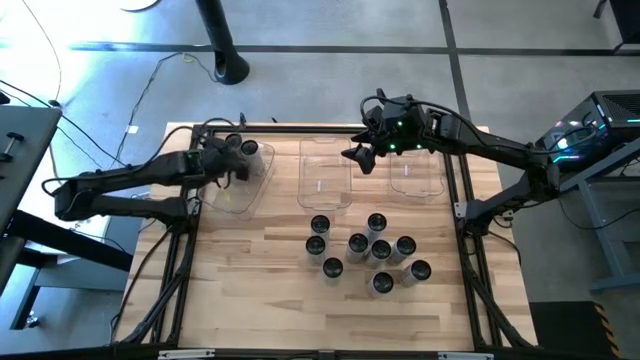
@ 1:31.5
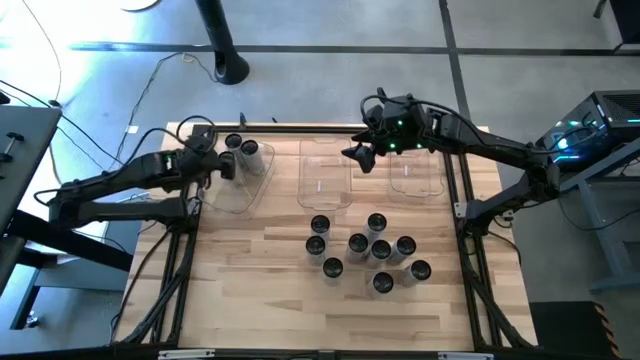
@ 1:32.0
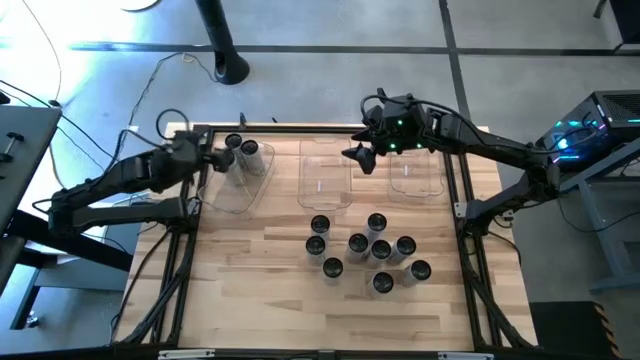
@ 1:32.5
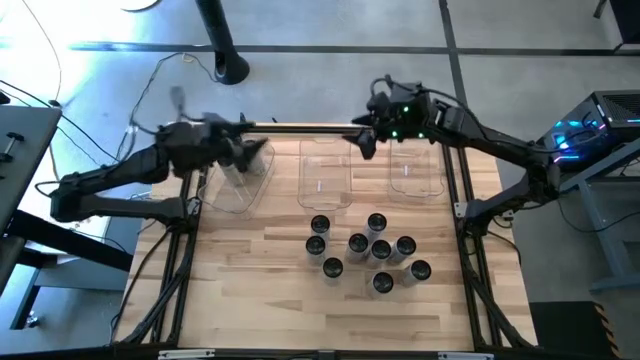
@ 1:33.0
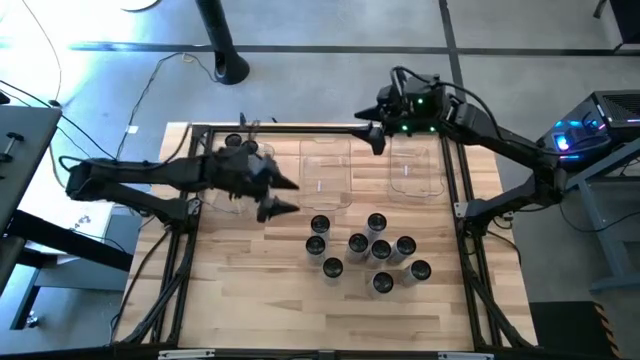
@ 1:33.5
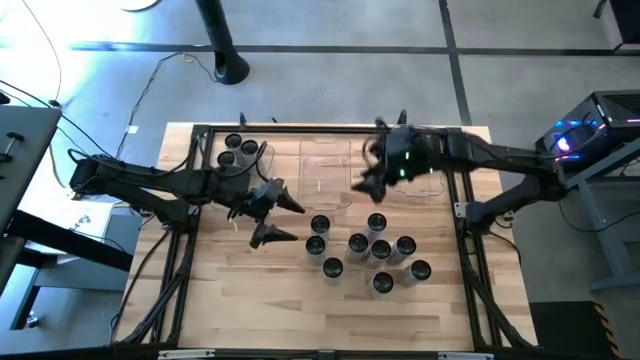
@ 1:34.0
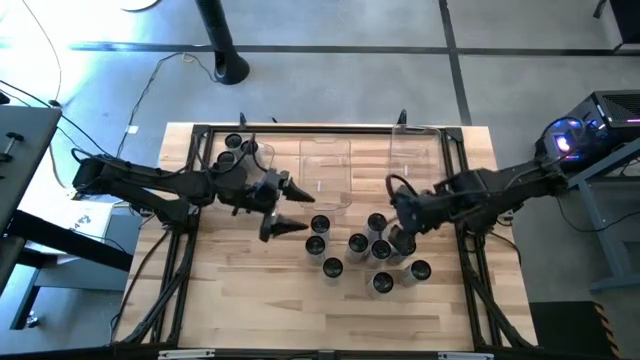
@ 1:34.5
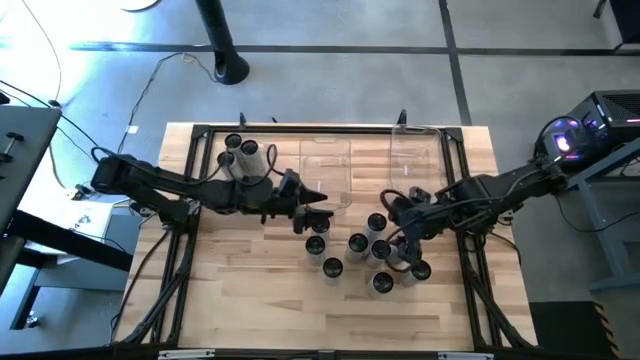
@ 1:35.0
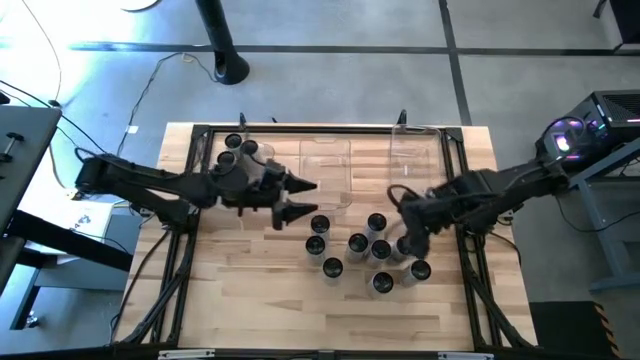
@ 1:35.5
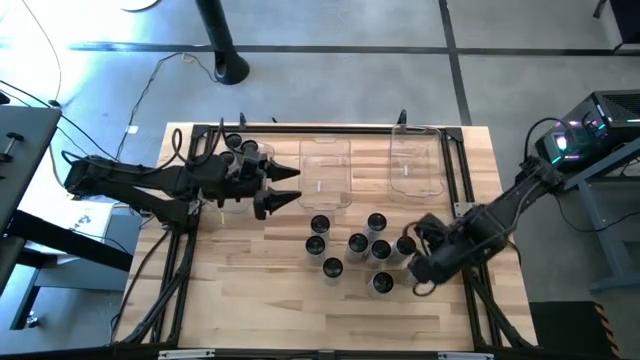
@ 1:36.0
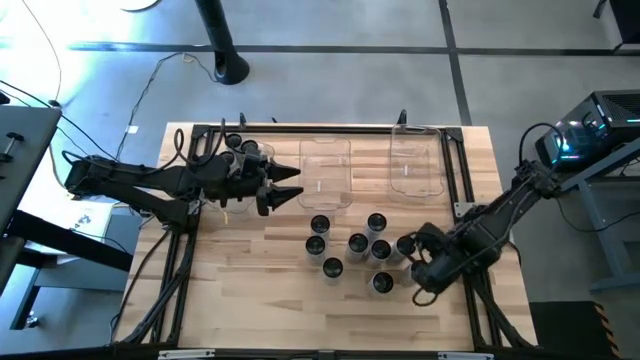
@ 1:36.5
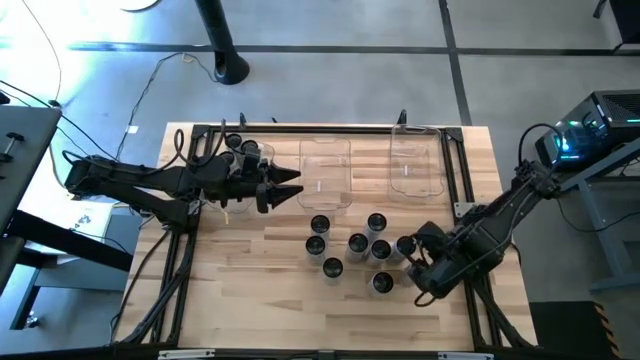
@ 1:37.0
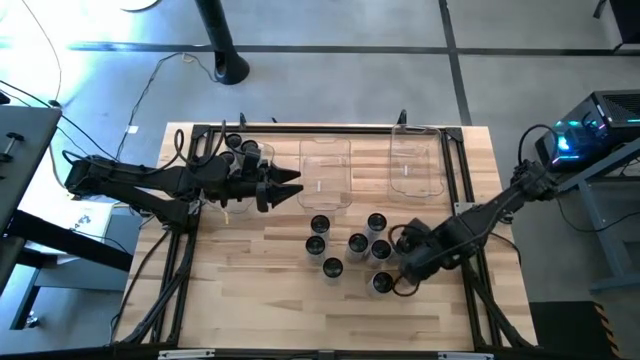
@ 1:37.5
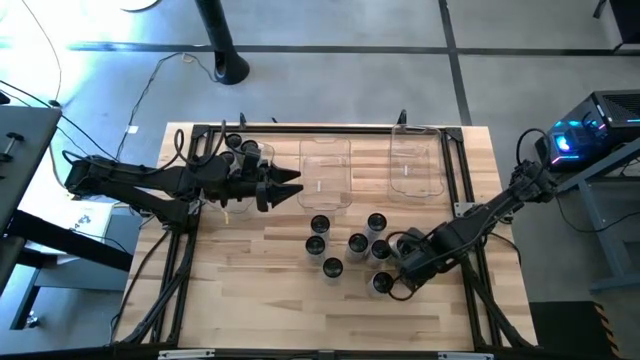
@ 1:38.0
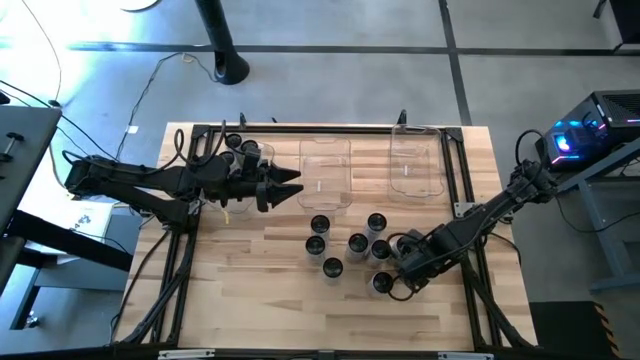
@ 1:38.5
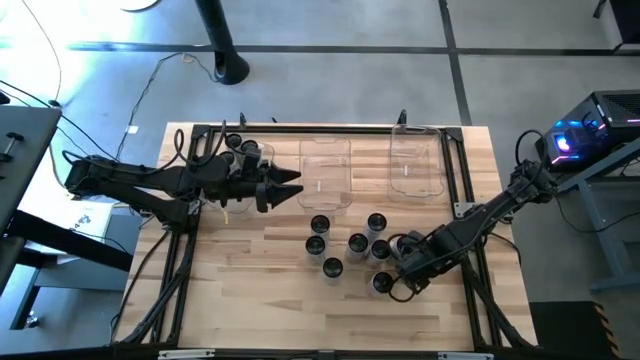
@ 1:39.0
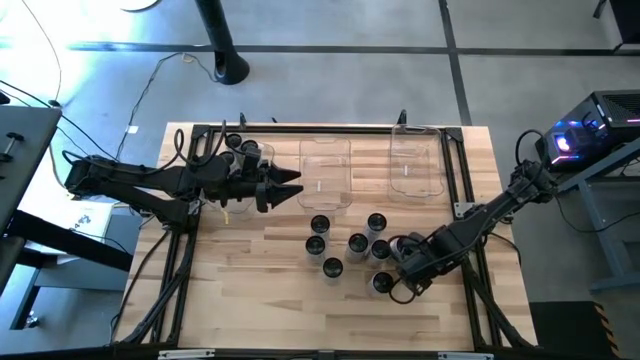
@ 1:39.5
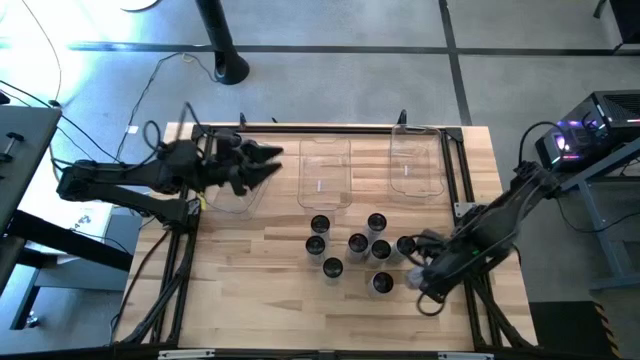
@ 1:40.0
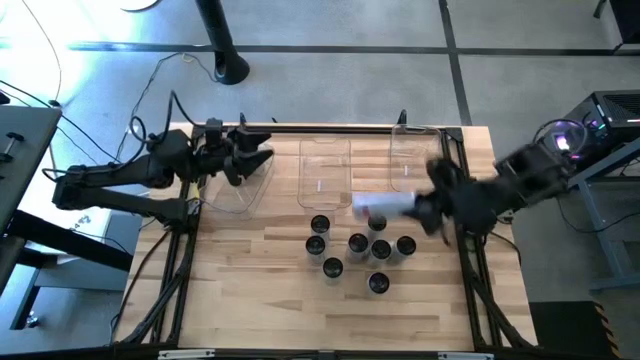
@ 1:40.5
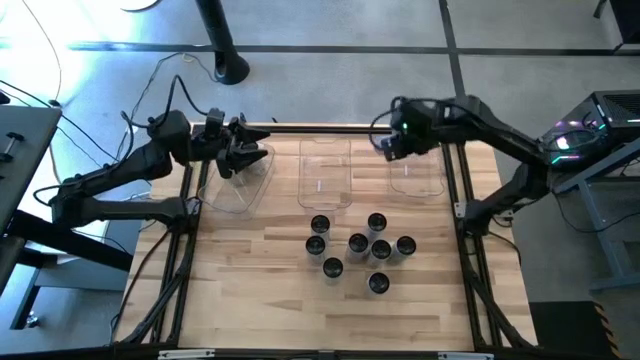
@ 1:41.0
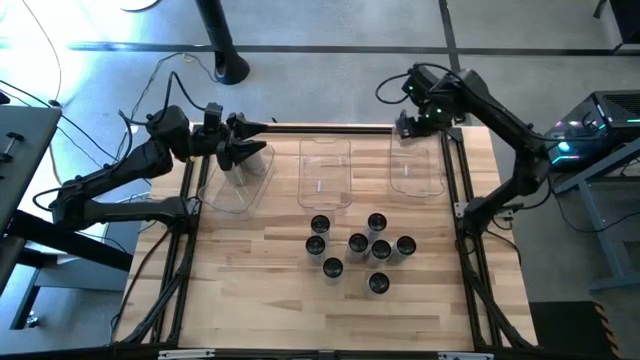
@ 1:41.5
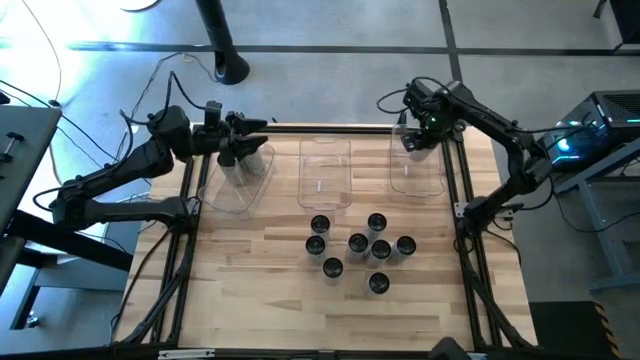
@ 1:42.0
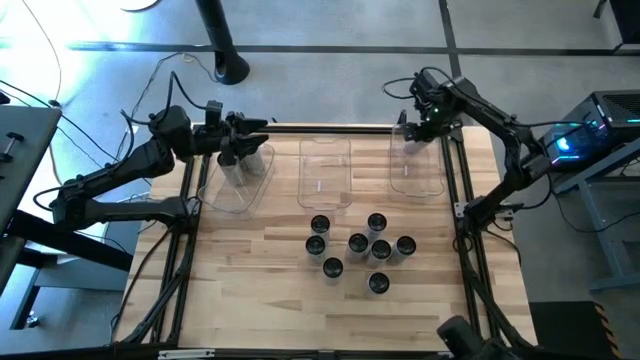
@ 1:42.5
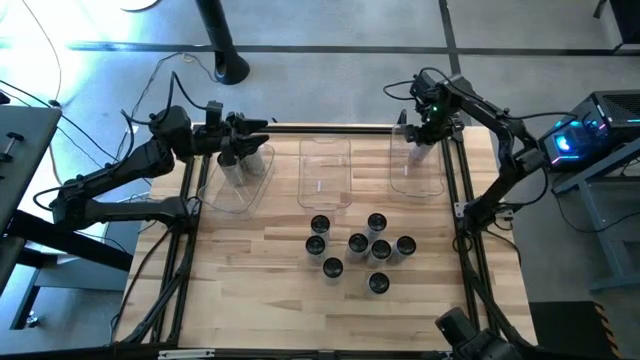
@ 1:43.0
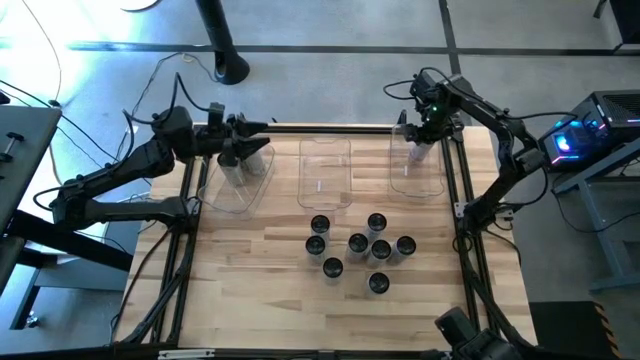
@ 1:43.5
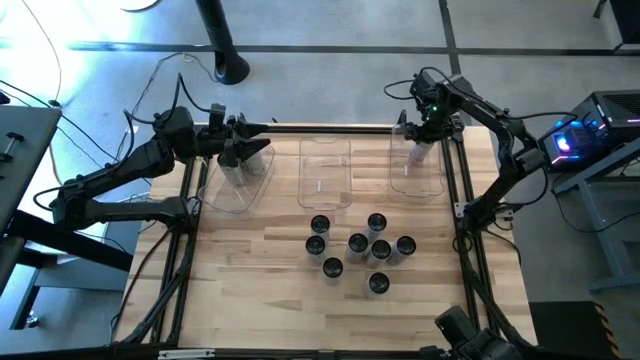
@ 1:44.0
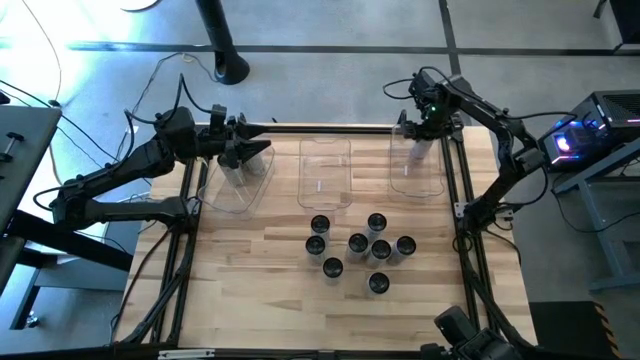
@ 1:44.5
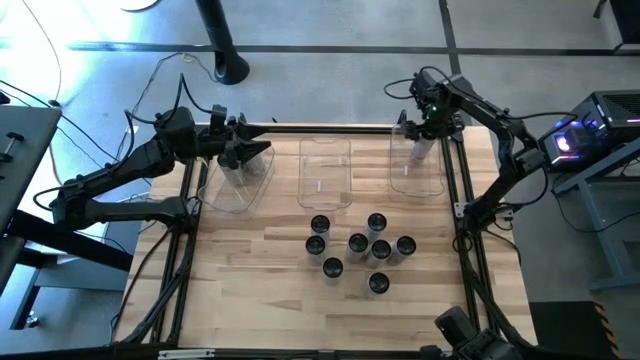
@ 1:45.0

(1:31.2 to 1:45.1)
Task: Sort soda cans
Put the white-pink soda can into the top right transparent bin

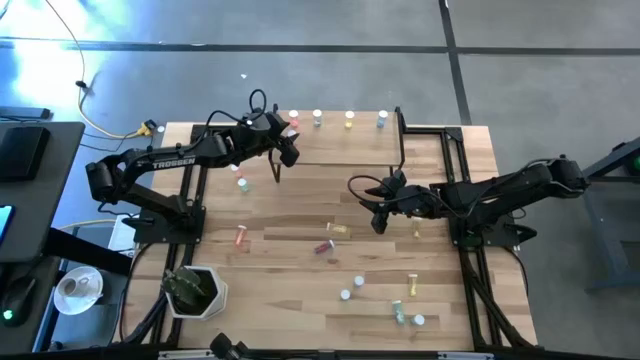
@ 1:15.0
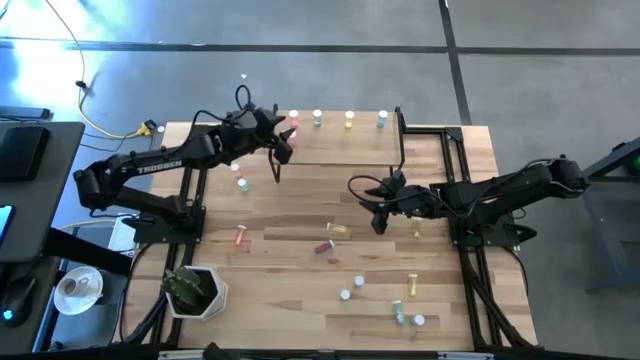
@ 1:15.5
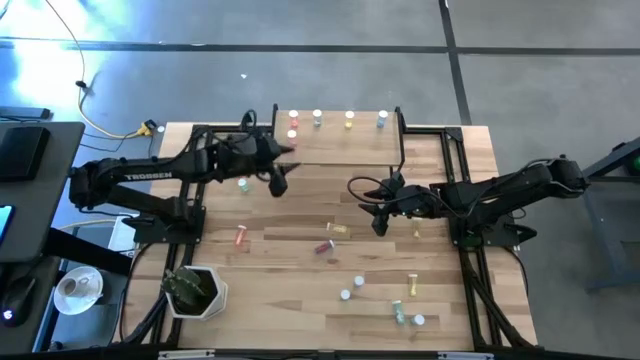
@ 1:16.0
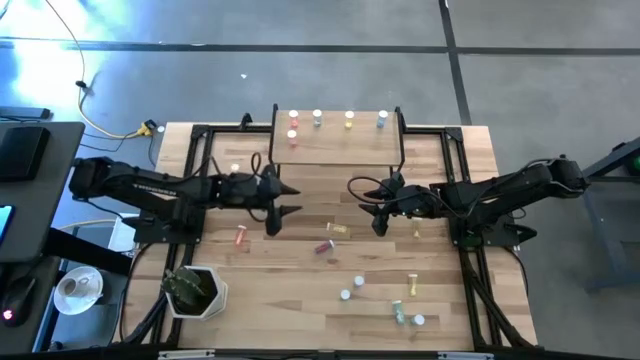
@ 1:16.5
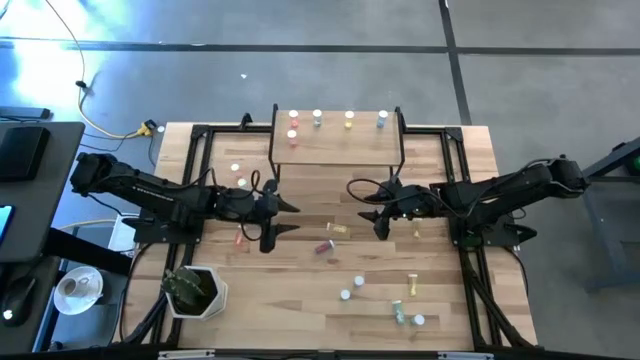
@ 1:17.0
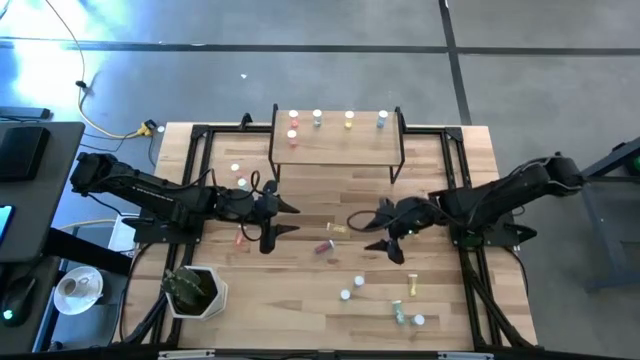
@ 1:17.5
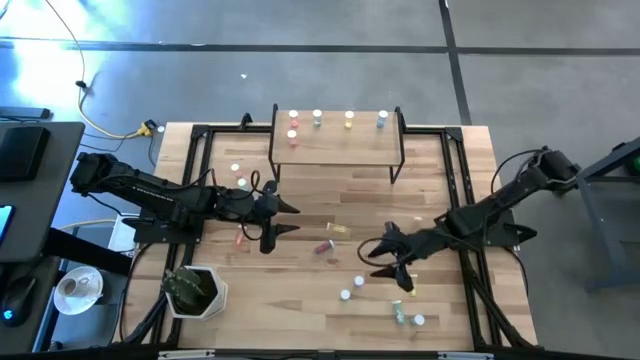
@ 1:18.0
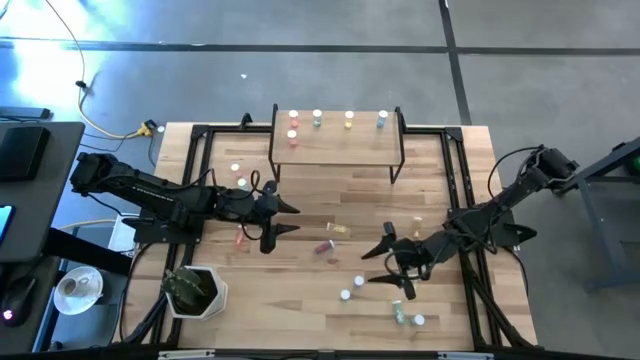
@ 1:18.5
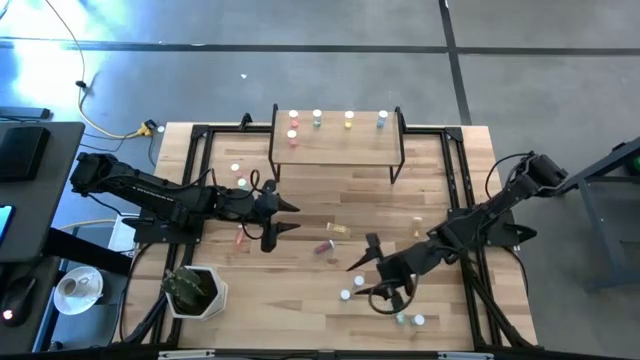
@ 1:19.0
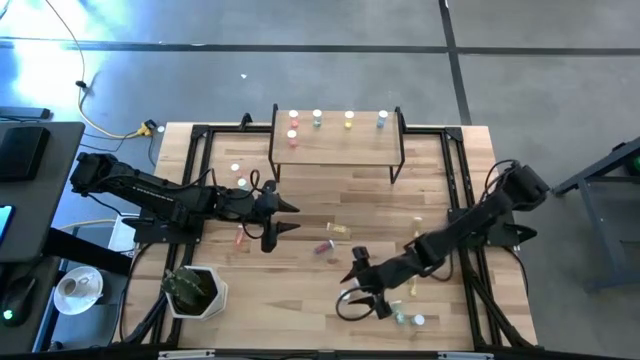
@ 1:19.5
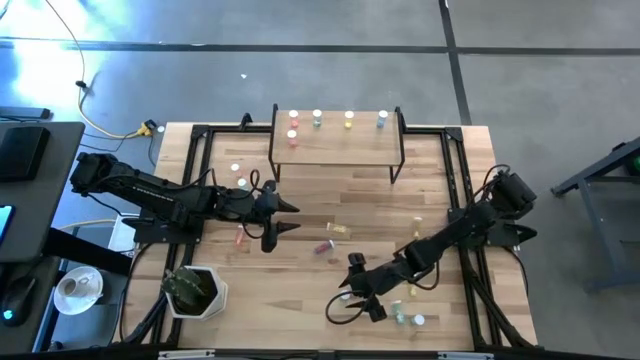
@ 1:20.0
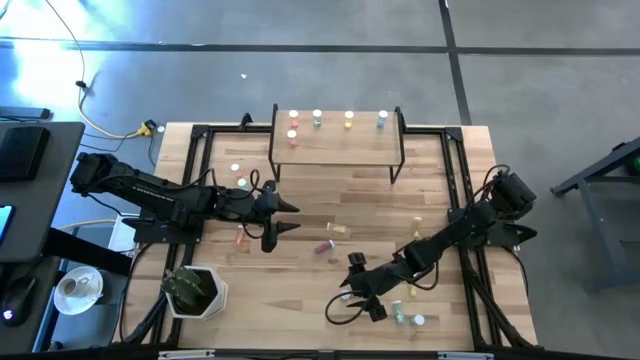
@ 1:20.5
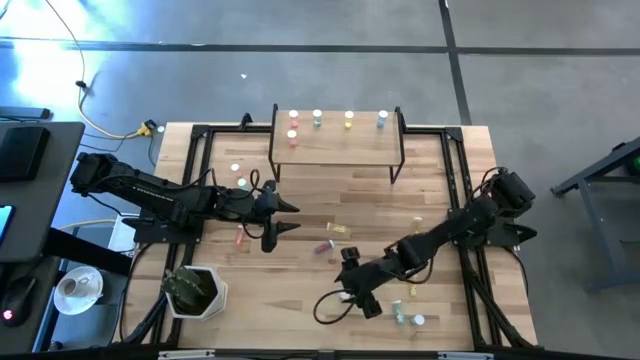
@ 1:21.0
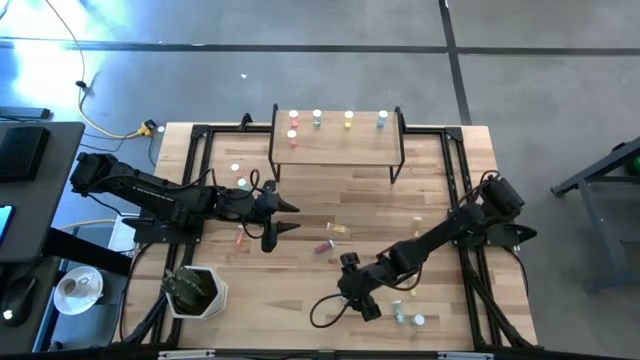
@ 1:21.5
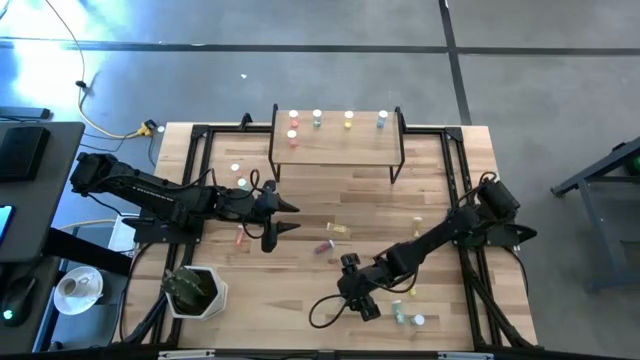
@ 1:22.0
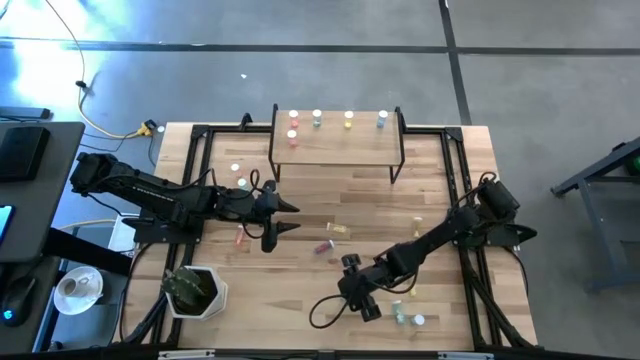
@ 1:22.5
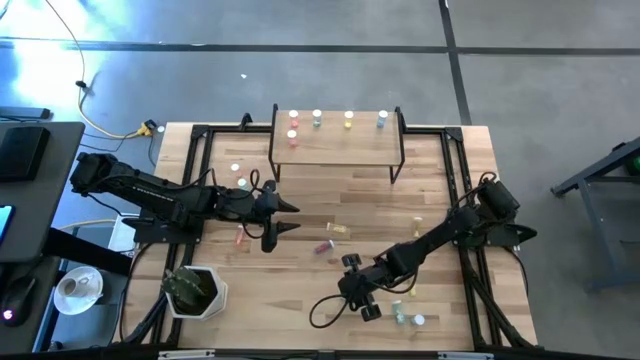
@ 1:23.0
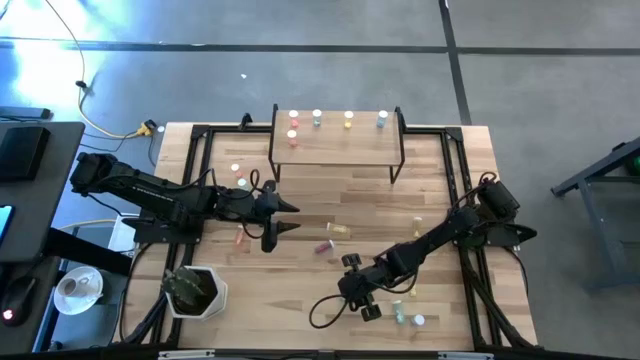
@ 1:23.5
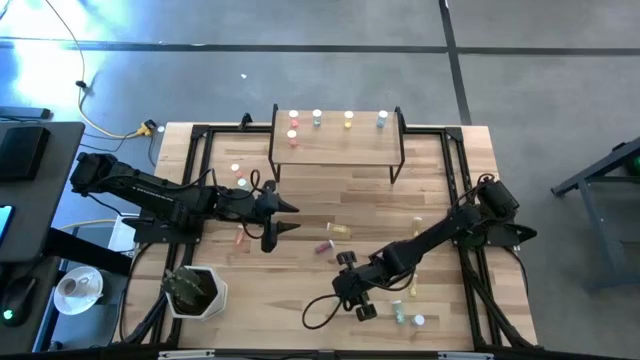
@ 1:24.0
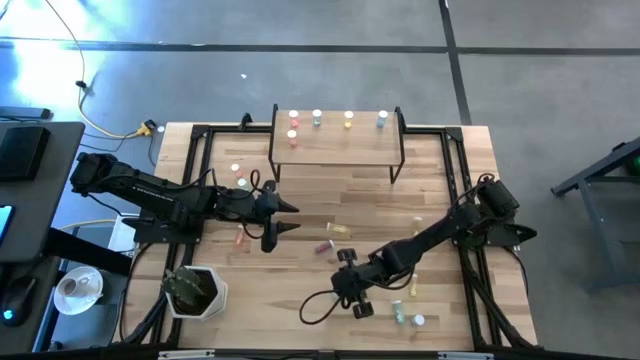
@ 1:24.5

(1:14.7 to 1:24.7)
Task: Pick and place medicine bottles onto shelf by color
Put the light blue medicine on the shelf
